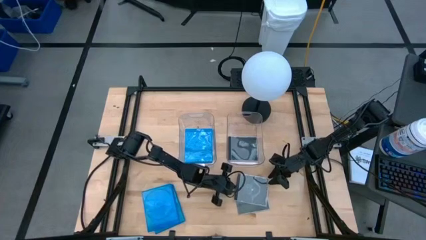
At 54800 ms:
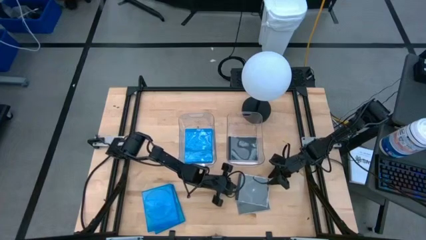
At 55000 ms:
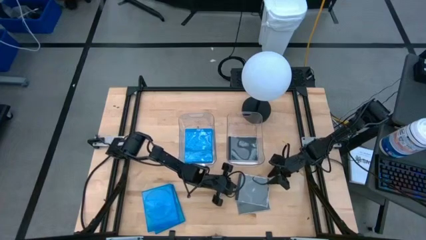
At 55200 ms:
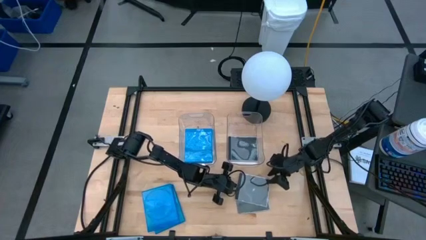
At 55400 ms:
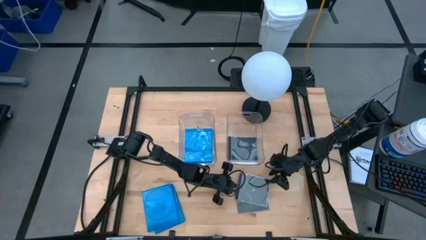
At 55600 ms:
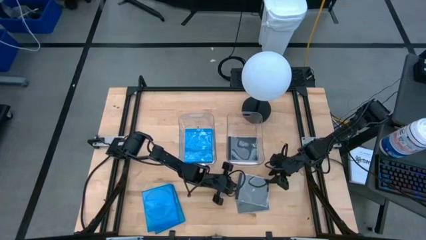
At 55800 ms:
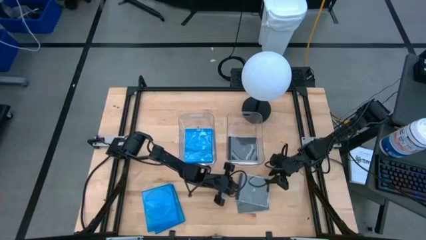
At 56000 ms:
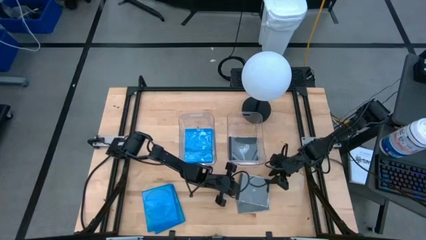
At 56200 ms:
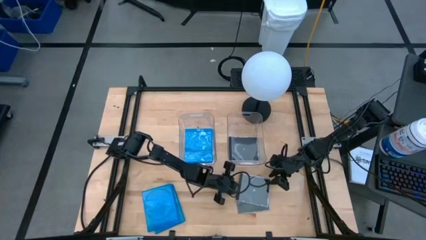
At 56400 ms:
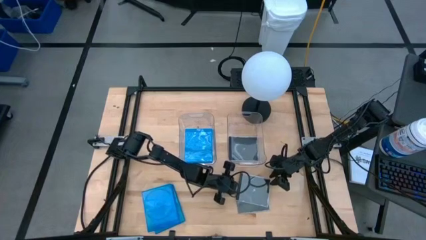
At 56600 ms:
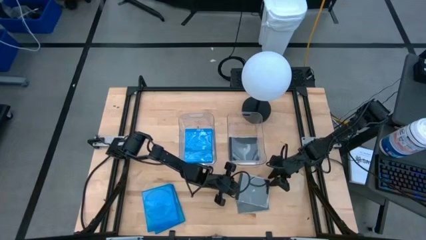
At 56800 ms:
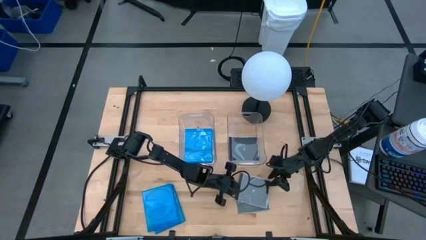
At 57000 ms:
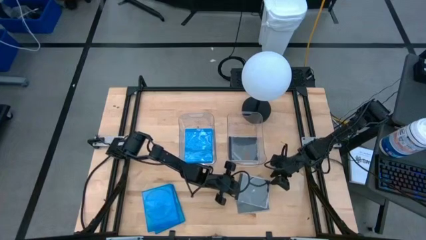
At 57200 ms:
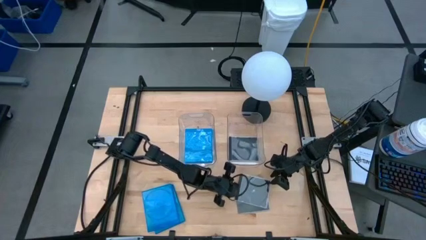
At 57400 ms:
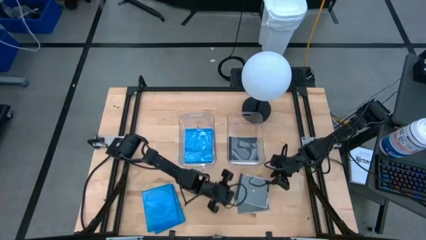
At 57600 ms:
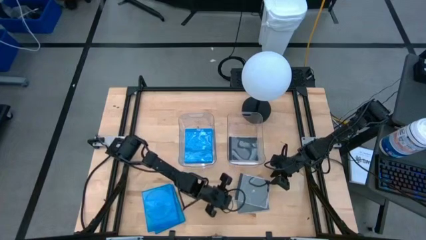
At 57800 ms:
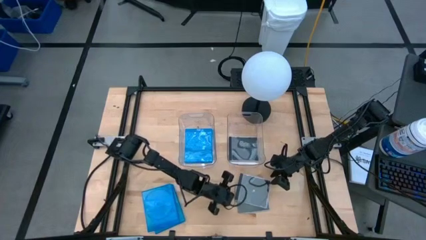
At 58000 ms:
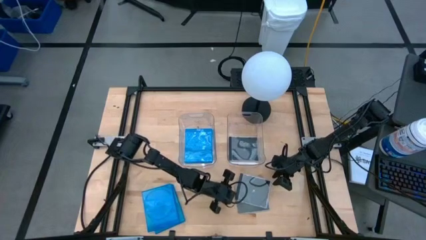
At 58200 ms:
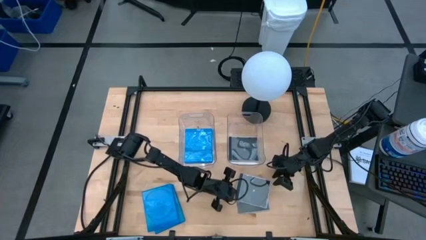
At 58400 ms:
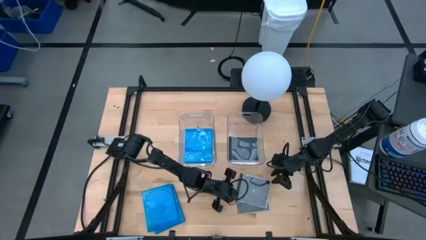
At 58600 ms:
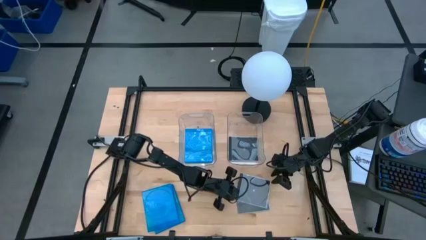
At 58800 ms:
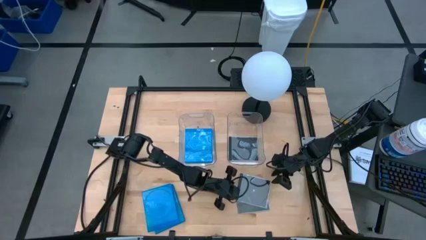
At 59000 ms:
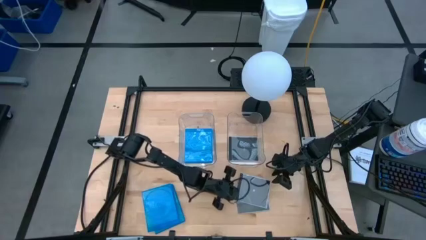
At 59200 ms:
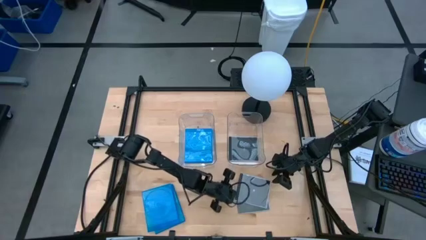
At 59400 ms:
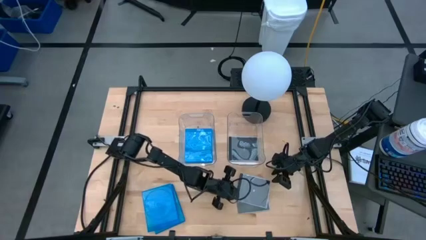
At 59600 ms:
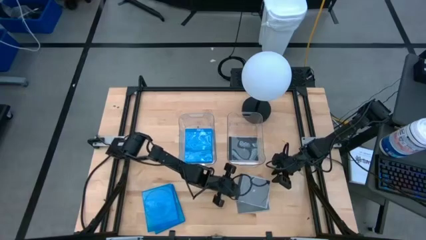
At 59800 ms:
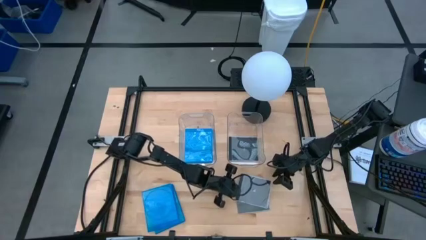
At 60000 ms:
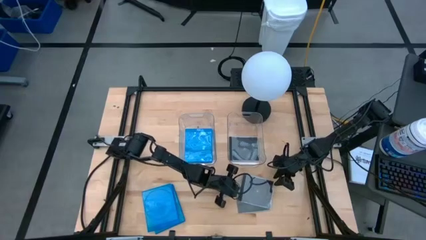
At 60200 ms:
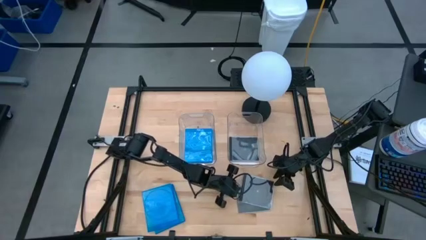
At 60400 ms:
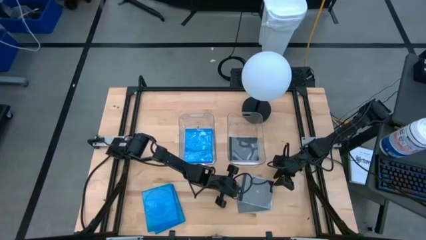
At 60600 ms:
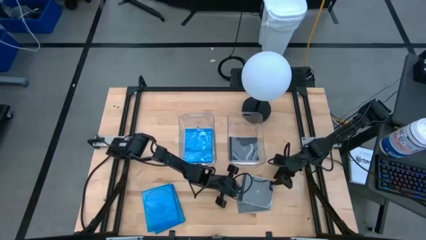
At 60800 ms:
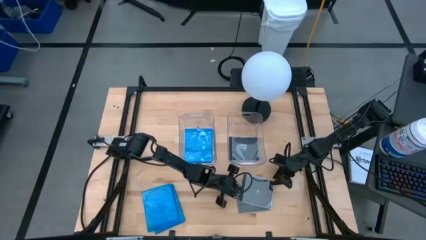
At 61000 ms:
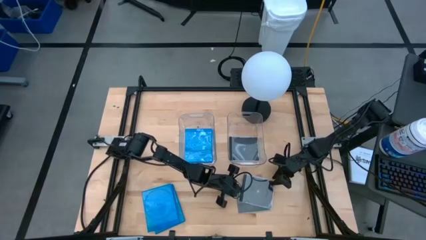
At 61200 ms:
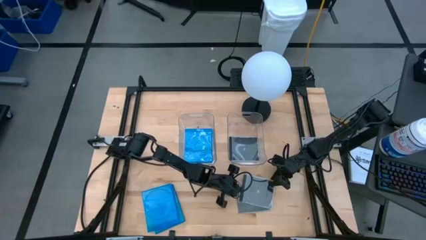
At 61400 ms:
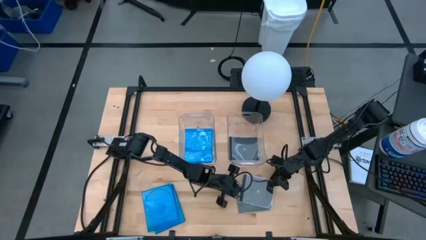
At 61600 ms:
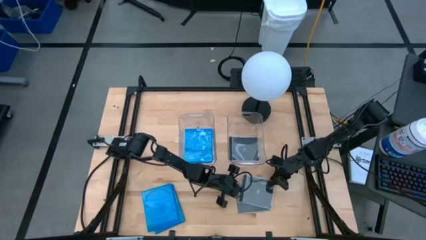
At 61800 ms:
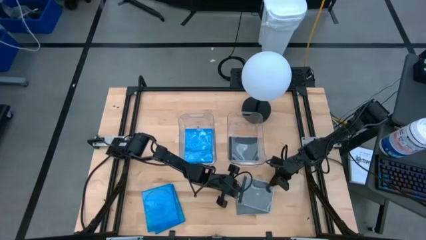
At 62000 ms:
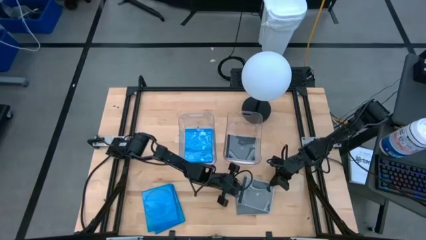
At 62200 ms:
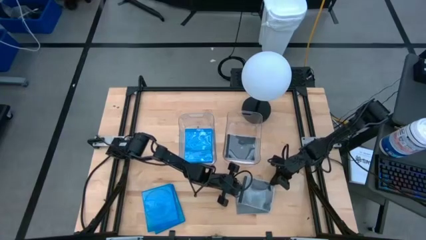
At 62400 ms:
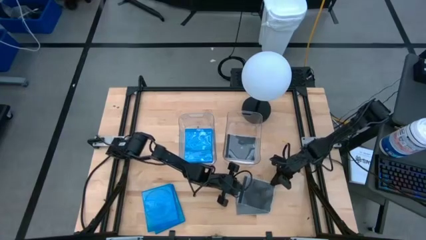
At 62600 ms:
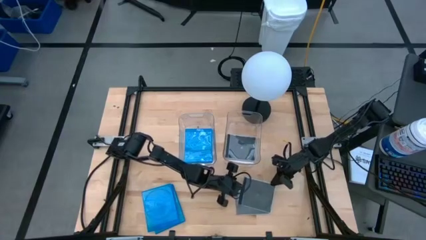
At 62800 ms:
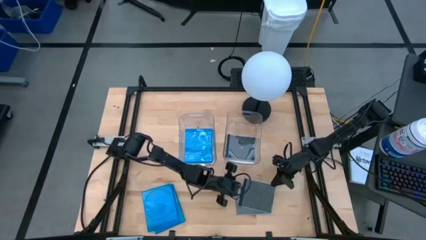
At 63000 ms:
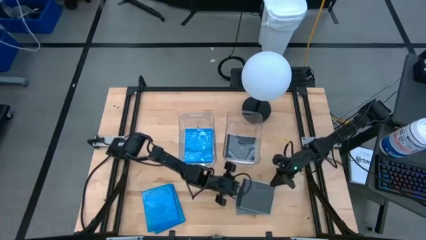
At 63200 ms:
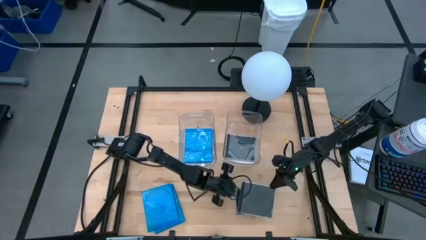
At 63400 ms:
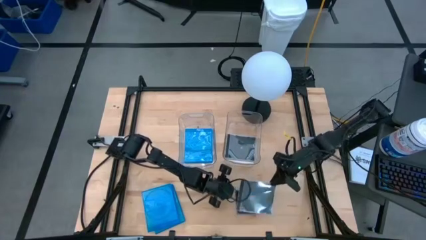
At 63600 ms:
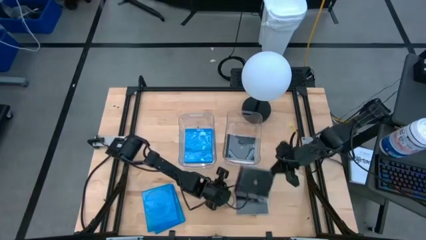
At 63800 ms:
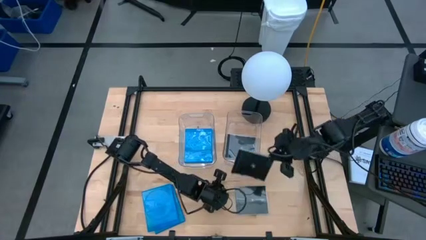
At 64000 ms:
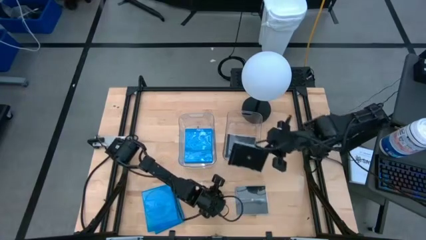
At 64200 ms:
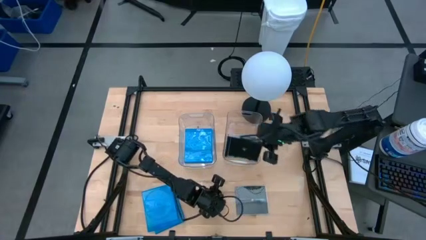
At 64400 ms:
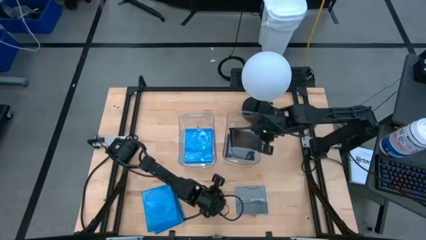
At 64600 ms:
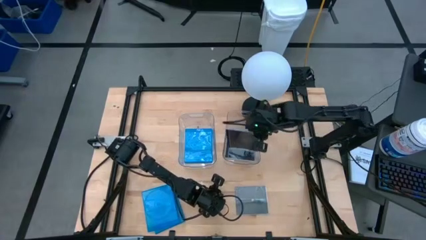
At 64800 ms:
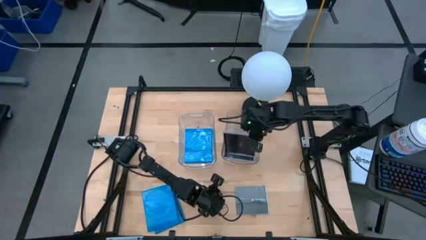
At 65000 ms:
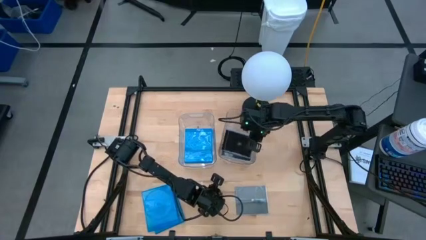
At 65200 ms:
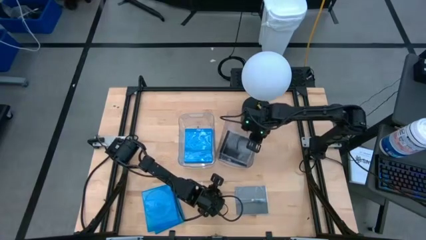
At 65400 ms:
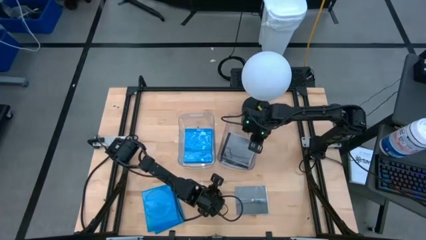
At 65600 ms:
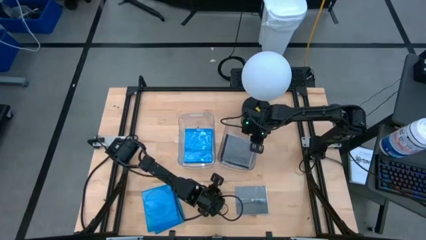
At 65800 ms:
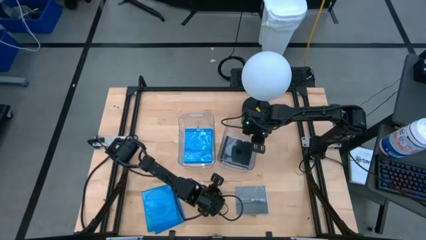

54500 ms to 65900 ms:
Task: Pick & place jewel cases by type
Put the black cd case into the right transparent bin

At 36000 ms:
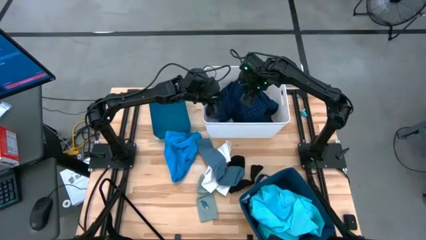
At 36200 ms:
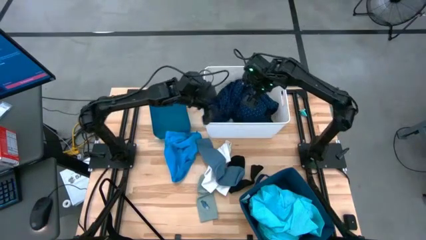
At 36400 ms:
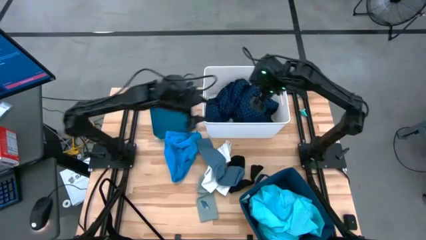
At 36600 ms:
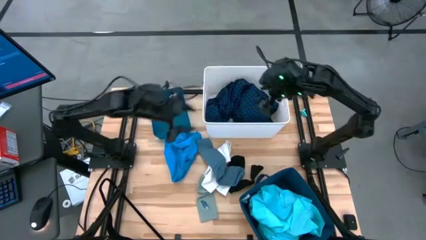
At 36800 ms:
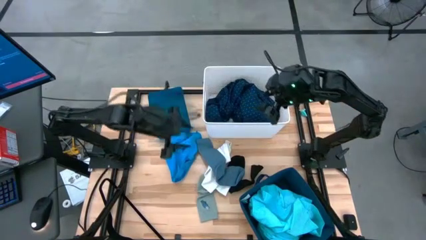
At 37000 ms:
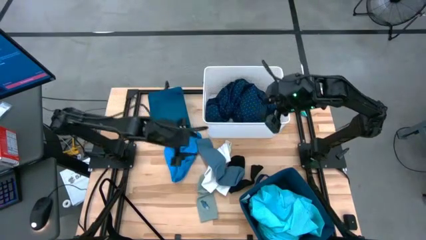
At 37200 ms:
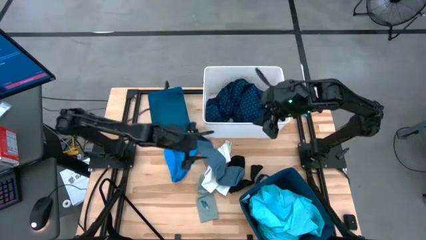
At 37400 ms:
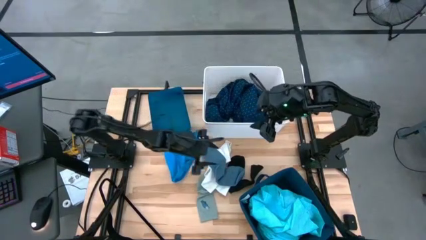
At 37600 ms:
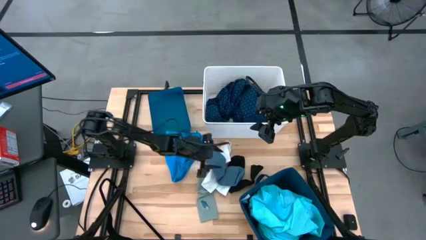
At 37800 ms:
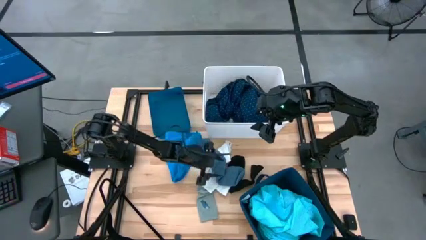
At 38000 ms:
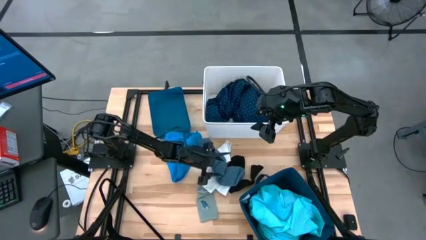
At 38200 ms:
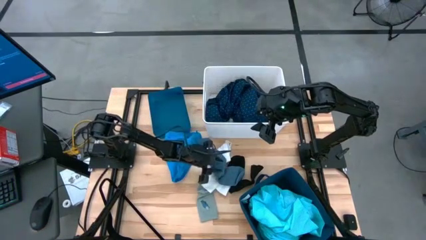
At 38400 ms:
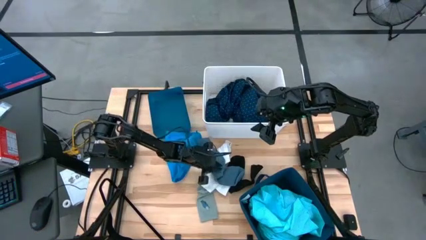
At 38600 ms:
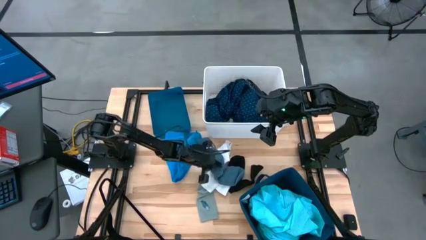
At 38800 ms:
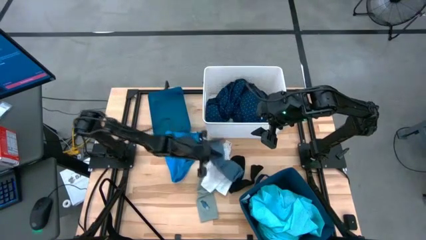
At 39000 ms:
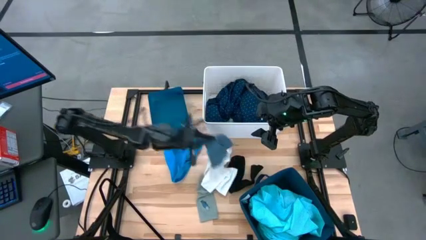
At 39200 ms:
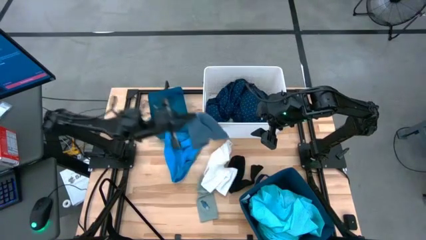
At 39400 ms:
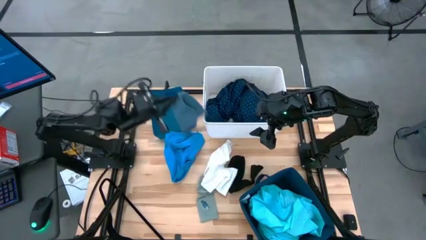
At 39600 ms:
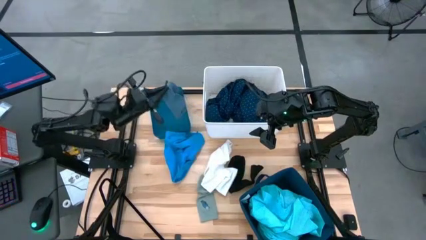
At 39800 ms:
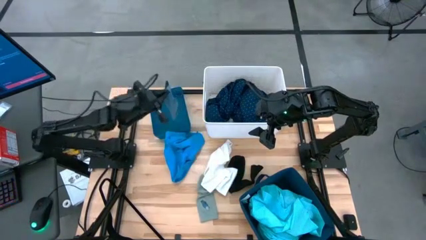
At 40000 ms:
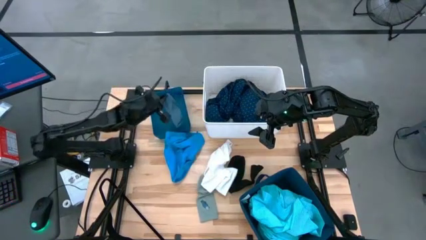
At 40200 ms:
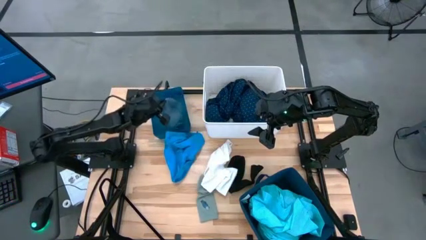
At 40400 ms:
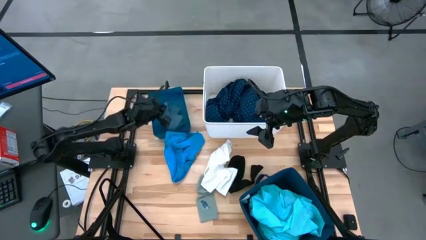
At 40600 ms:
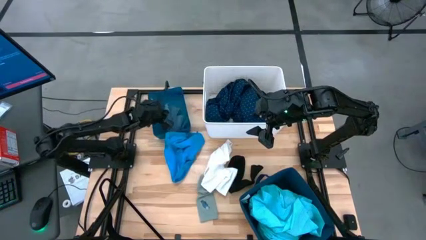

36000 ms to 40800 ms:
Task: Pick & Place Cloths
Put the blue sock into the blue bin
